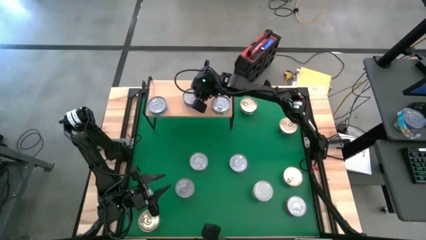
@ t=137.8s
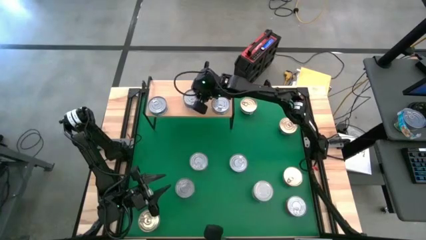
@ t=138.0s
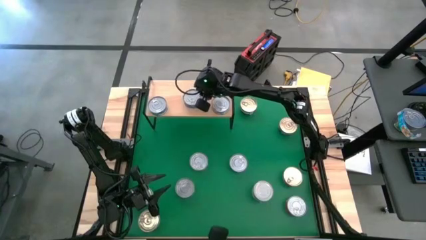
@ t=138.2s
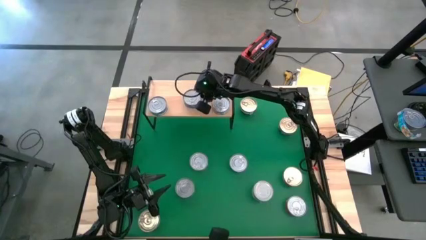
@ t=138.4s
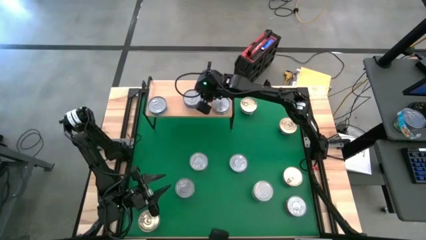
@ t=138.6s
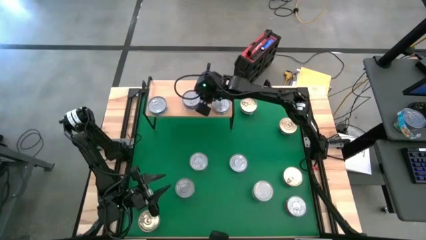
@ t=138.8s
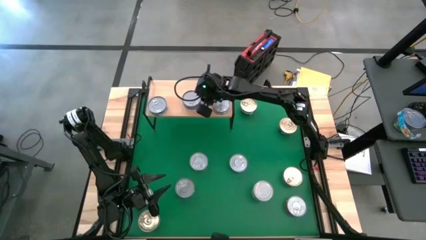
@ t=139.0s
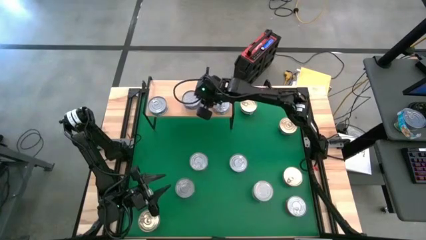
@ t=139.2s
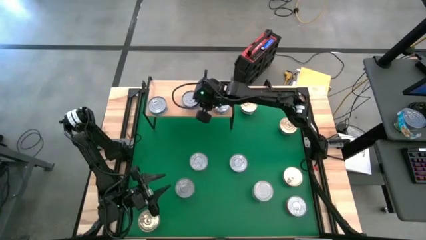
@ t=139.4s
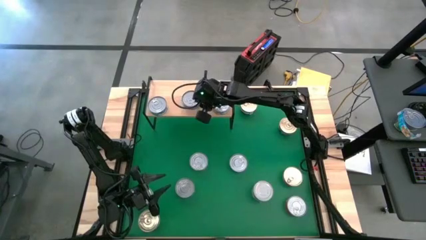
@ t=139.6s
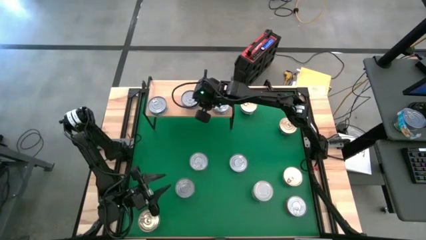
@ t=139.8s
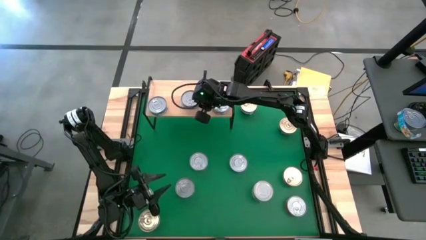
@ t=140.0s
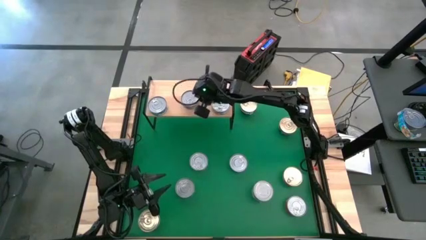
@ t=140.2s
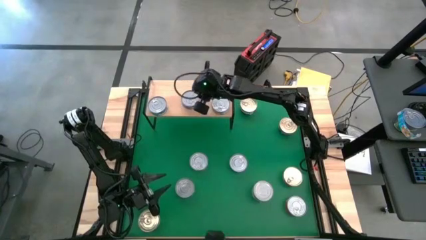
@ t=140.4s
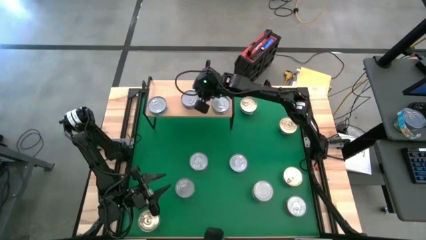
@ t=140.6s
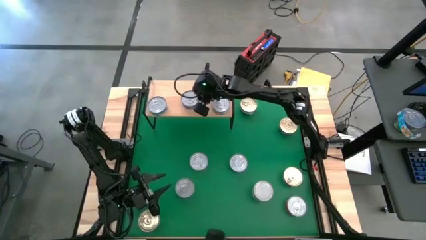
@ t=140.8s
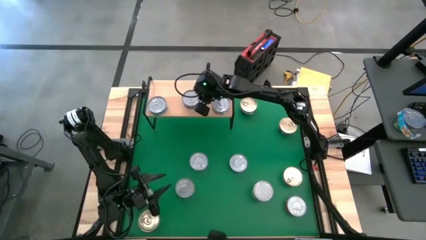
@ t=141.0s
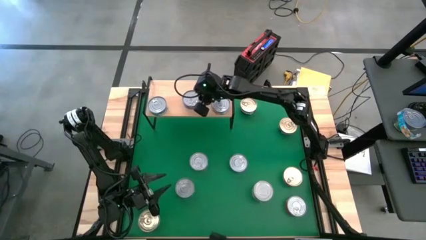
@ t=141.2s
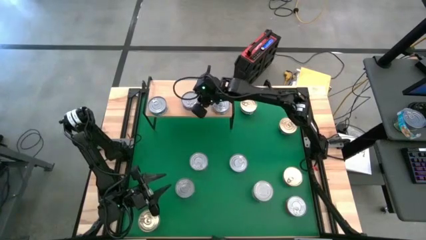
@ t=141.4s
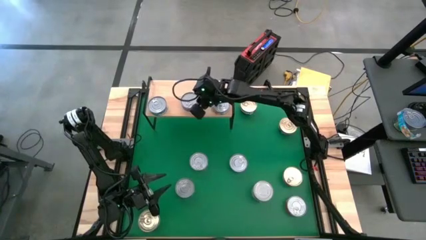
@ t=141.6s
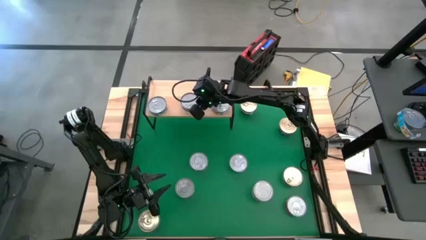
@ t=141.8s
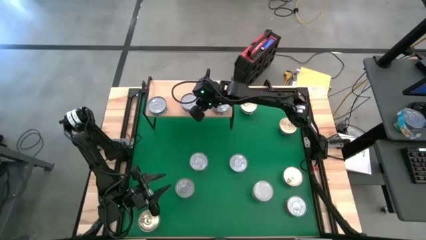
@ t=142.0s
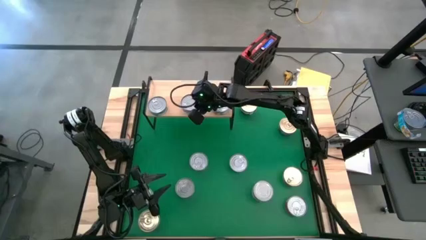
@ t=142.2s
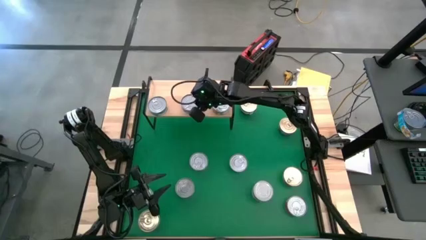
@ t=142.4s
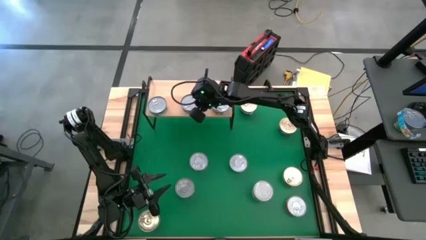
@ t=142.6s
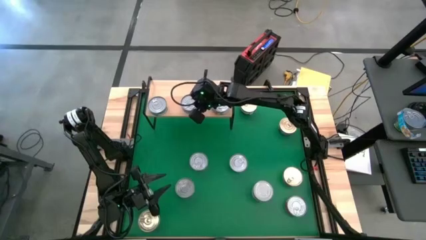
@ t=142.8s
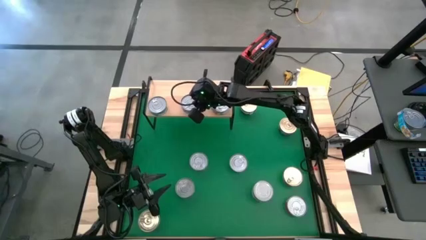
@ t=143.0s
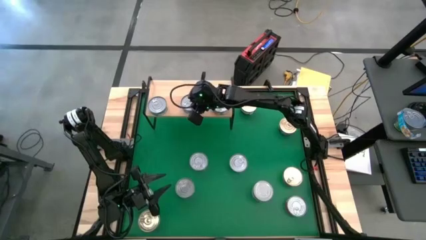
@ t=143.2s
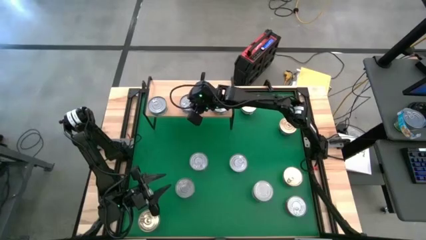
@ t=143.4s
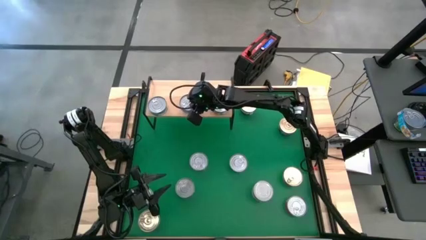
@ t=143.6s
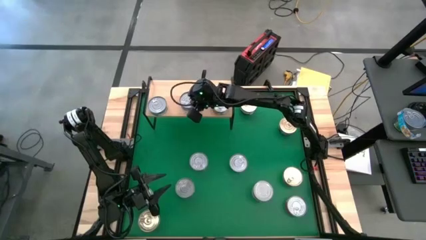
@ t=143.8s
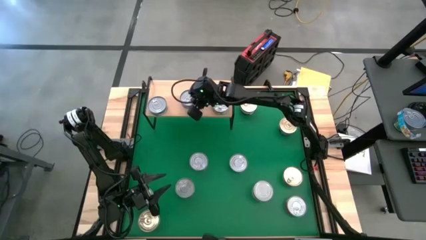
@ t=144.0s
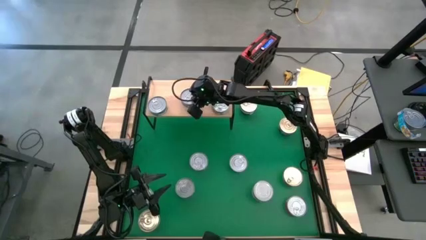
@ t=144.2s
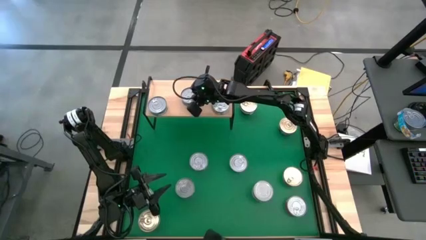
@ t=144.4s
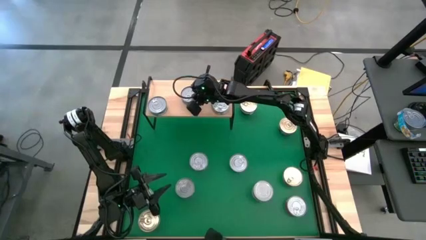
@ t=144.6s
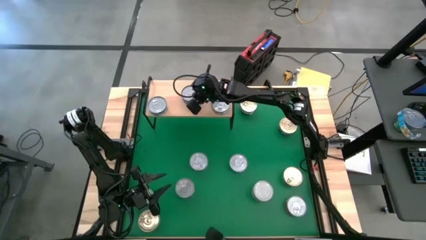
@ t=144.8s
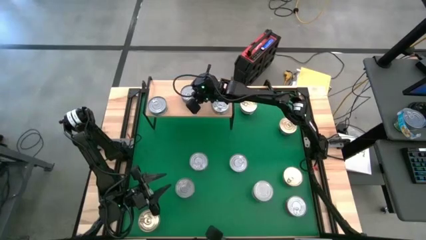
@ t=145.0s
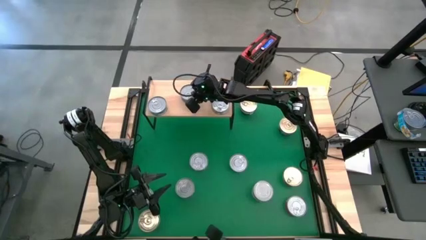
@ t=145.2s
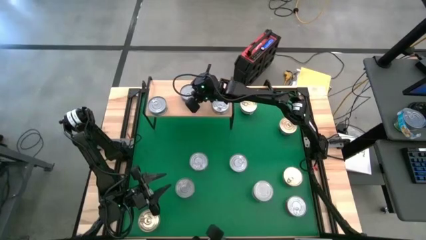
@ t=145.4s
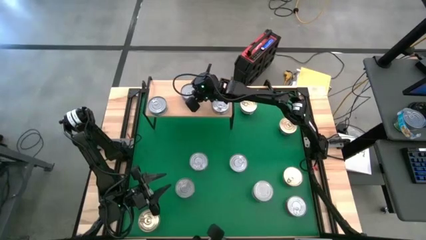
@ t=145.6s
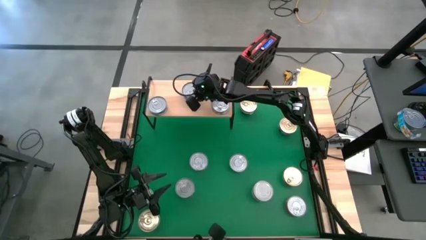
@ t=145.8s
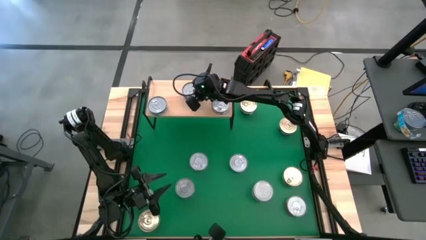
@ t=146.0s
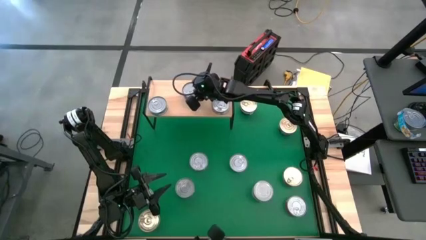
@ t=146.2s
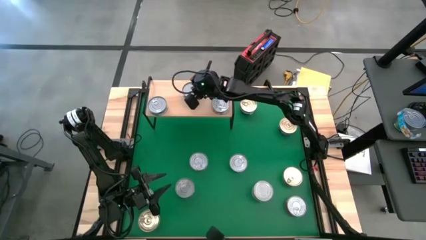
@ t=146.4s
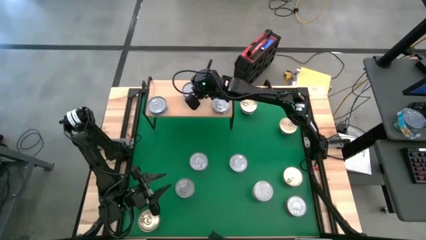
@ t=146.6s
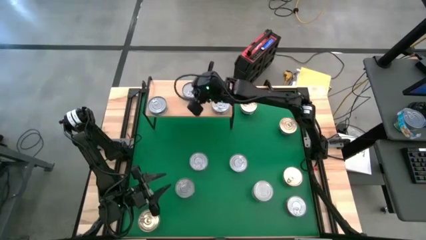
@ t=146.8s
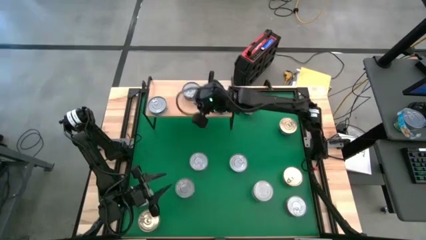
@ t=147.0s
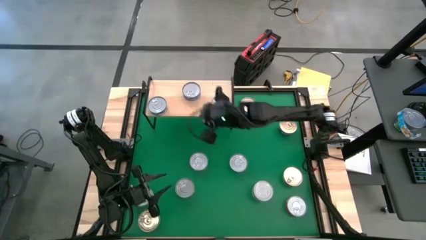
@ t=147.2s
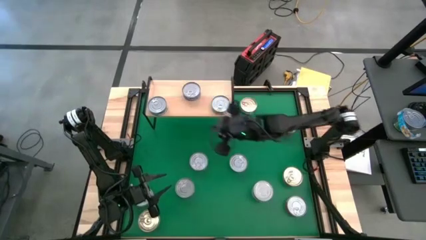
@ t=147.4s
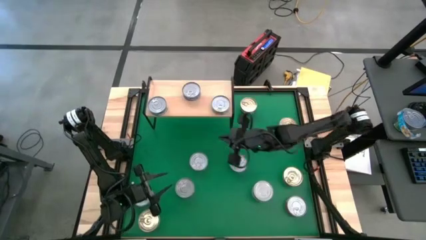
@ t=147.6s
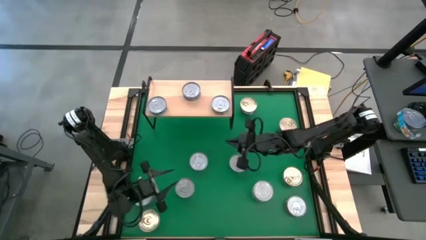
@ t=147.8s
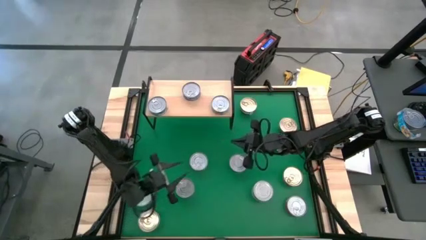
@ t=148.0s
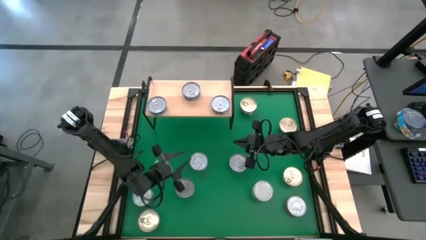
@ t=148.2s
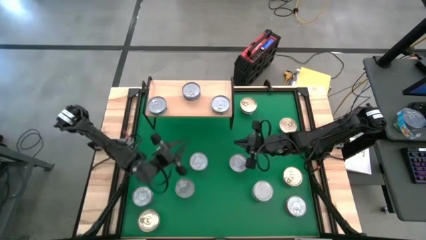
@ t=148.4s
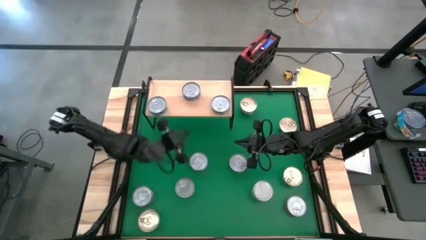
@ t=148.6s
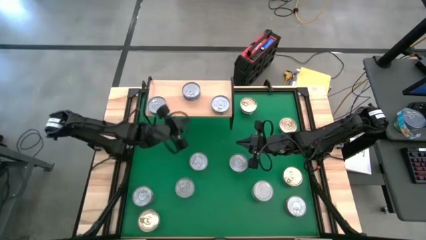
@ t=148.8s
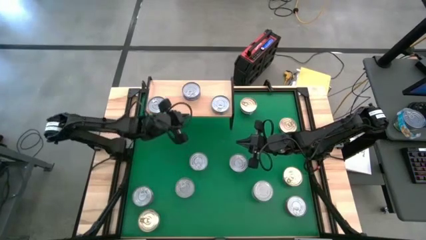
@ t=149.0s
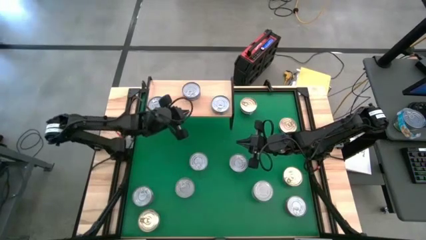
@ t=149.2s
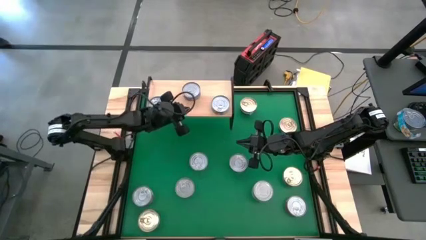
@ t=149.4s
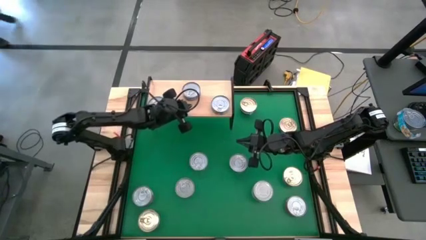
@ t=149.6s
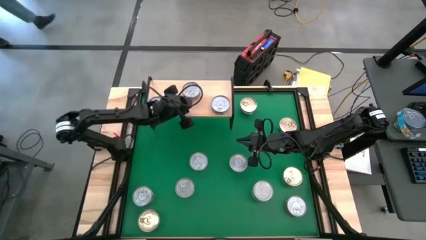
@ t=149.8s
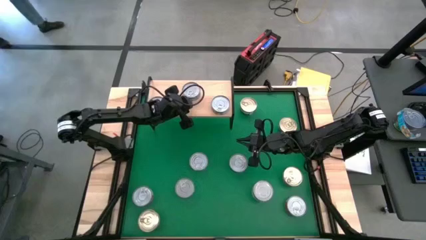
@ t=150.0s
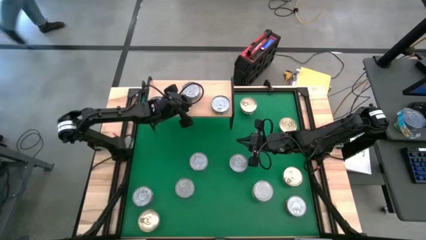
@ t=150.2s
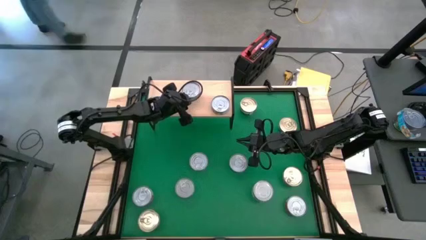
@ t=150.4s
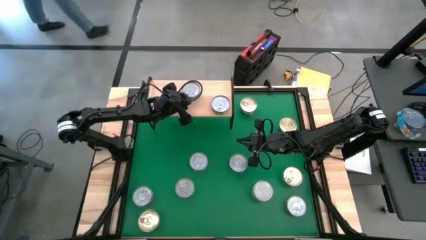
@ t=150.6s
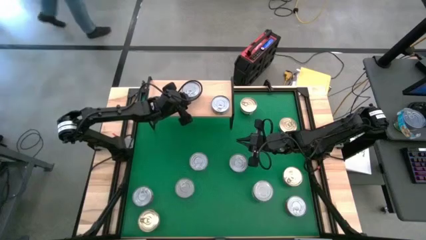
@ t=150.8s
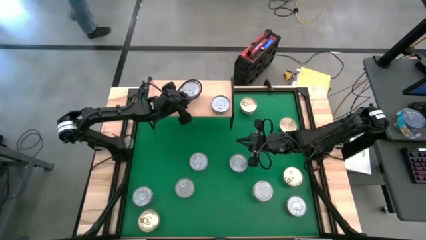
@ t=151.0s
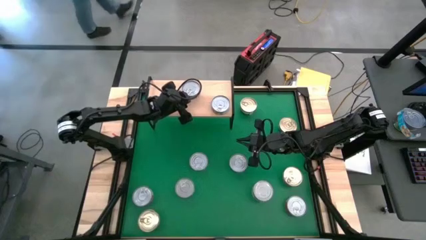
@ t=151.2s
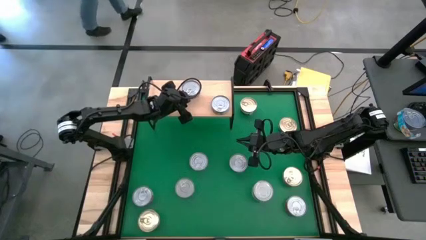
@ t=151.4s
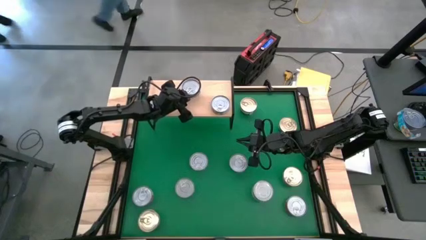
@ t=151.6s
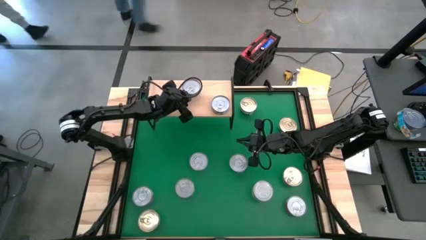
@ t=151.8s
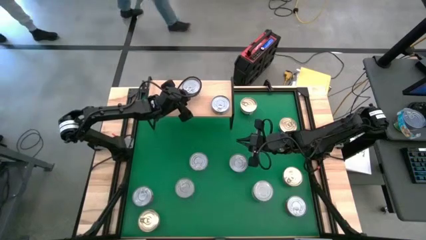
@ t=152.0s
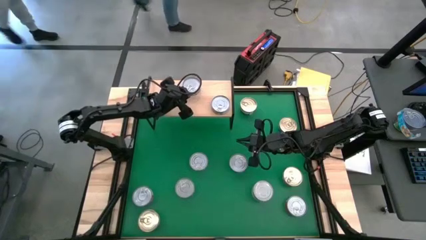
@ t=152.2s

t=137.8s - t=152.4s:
Task: Stack canned seafood by type on shelf
Put the middle left dark blue tuna can on the shelf
